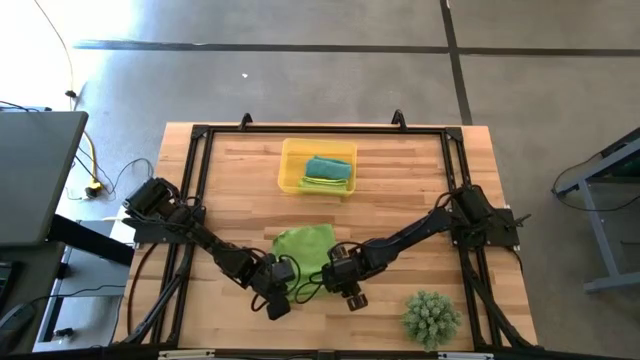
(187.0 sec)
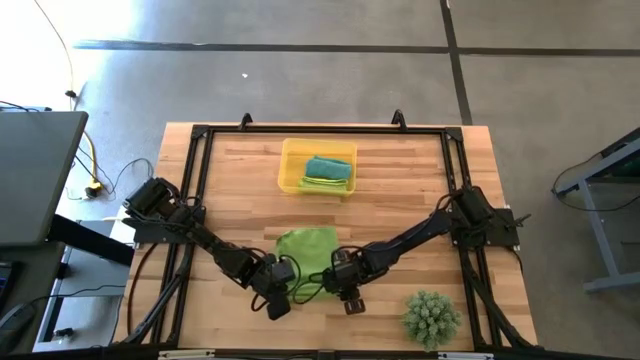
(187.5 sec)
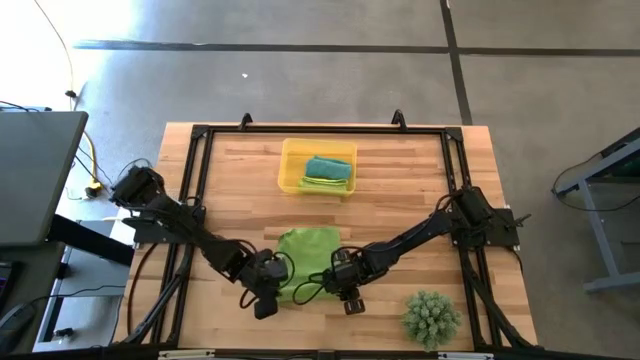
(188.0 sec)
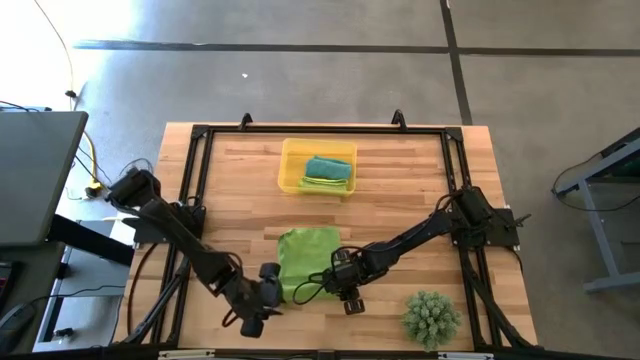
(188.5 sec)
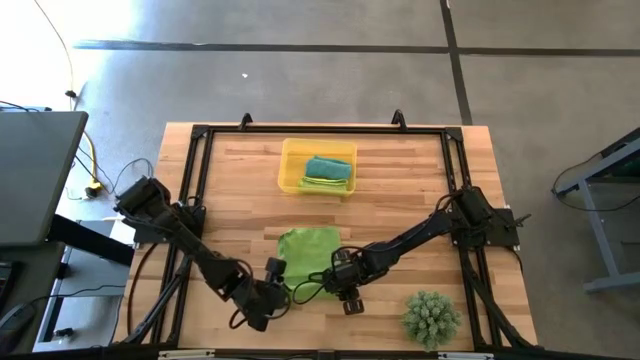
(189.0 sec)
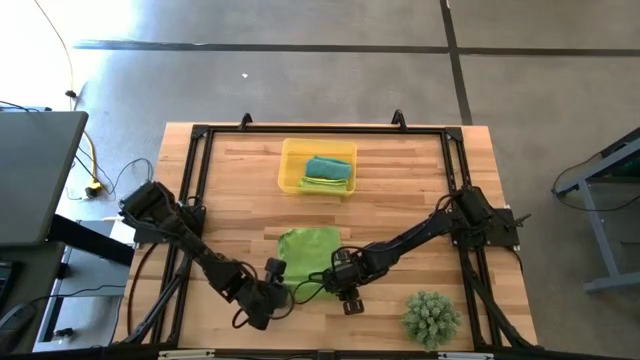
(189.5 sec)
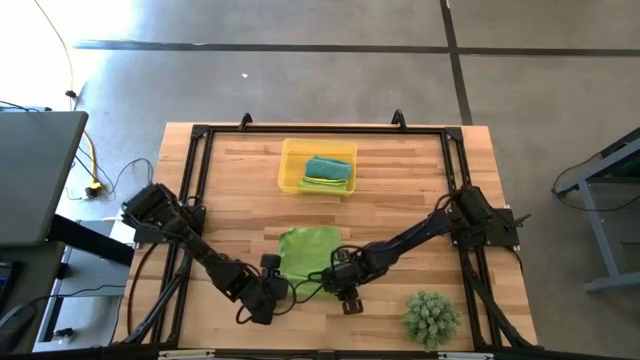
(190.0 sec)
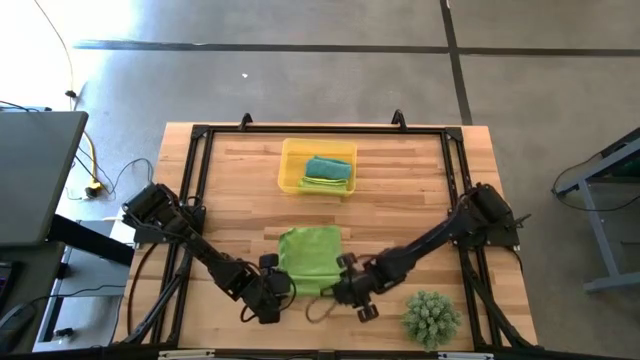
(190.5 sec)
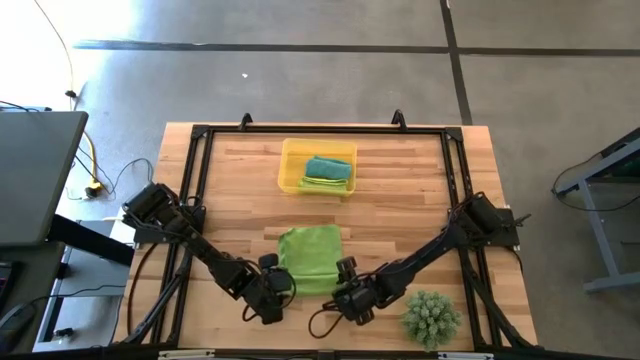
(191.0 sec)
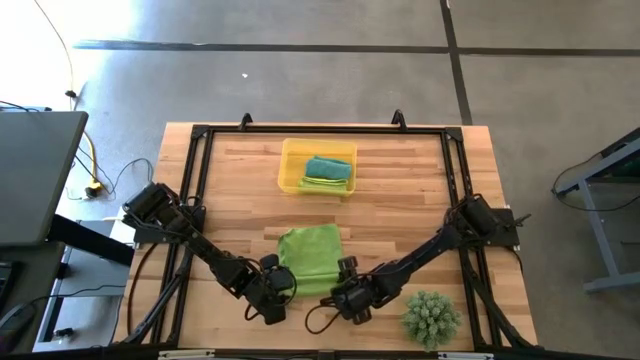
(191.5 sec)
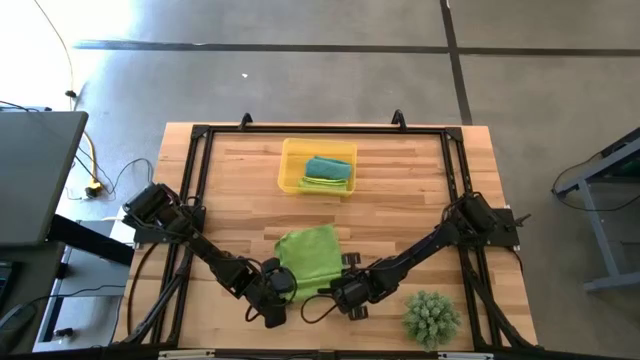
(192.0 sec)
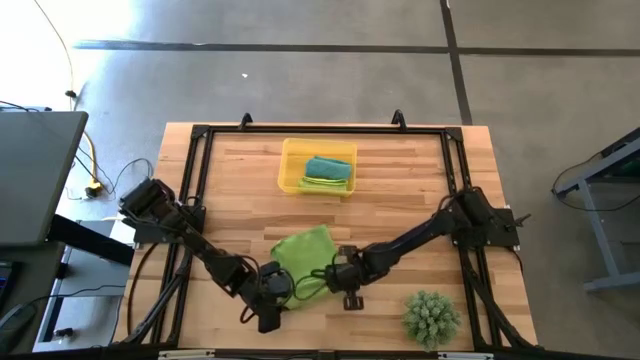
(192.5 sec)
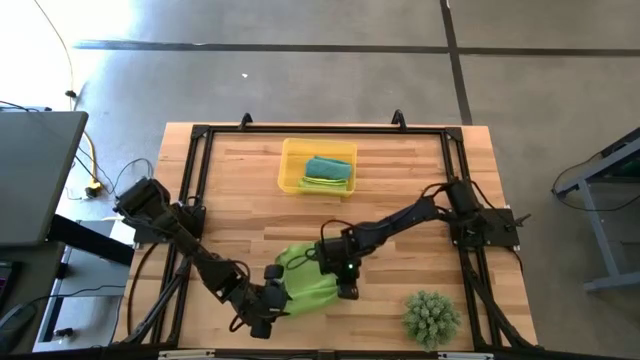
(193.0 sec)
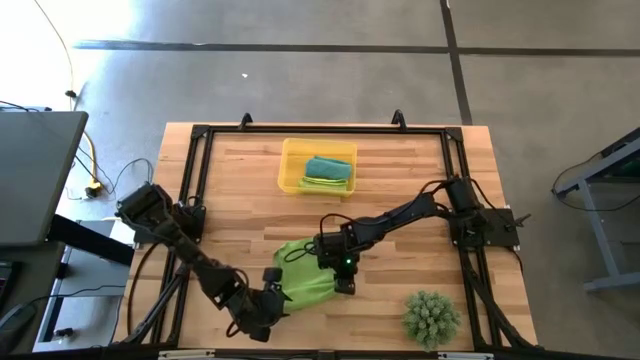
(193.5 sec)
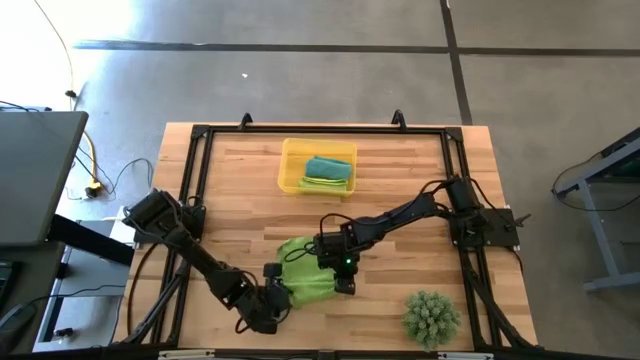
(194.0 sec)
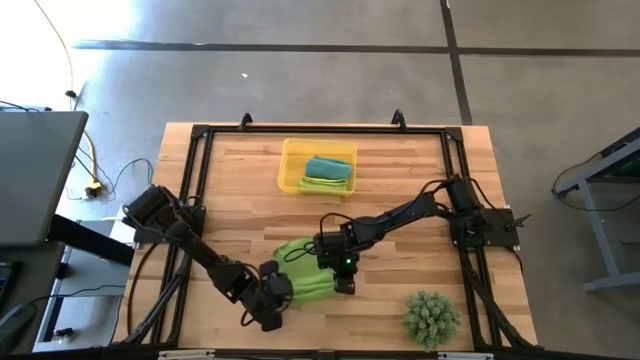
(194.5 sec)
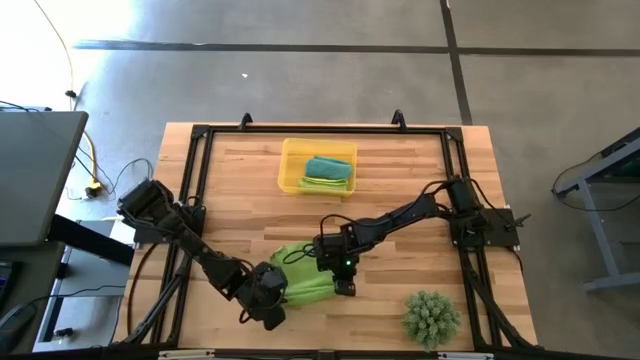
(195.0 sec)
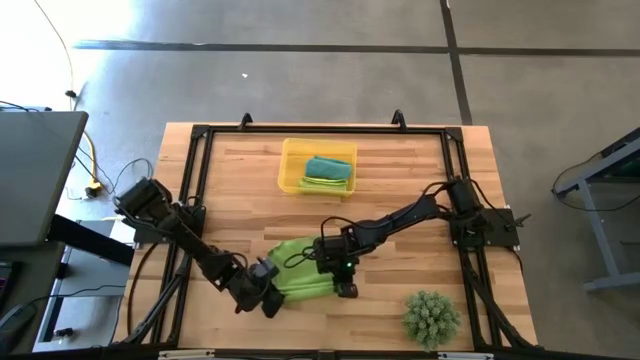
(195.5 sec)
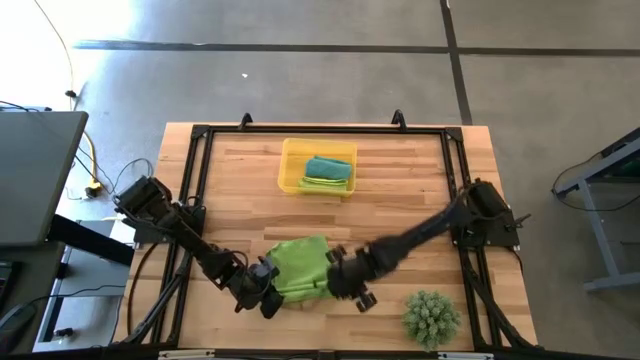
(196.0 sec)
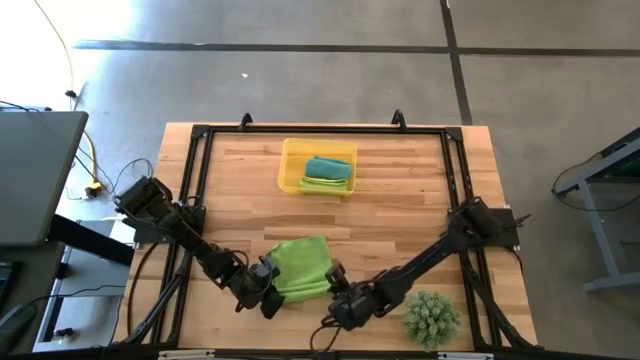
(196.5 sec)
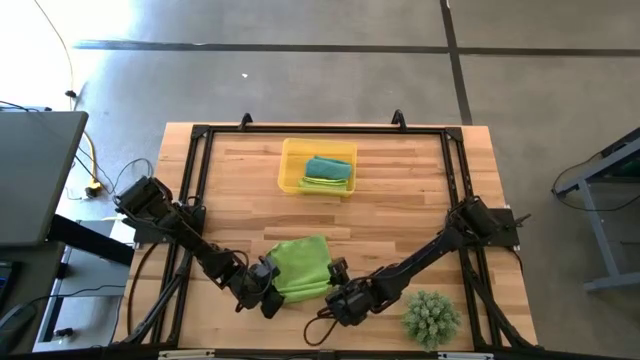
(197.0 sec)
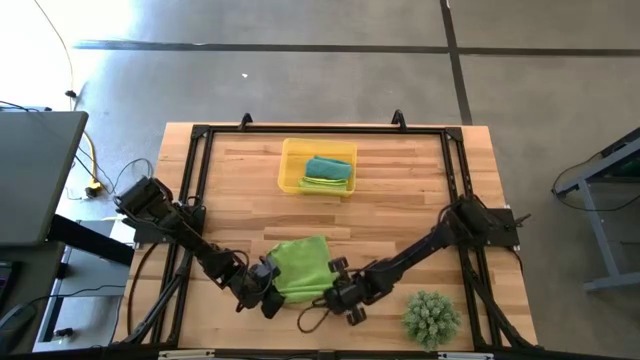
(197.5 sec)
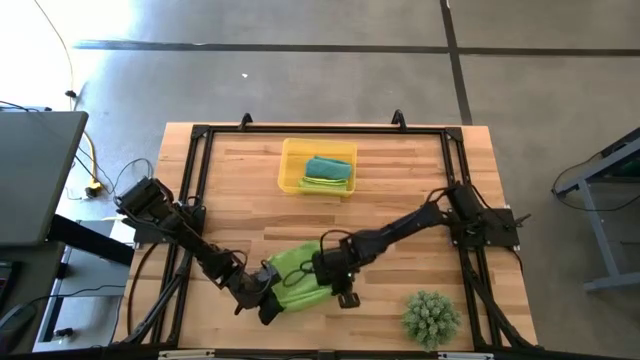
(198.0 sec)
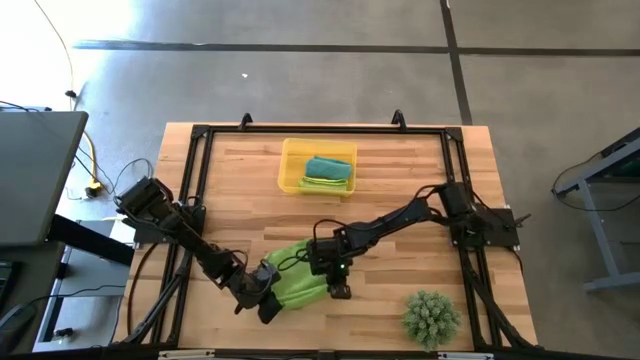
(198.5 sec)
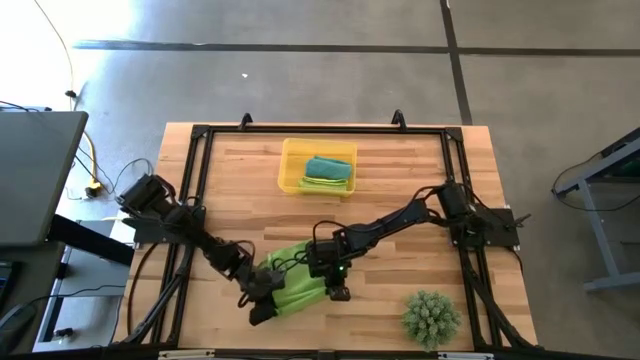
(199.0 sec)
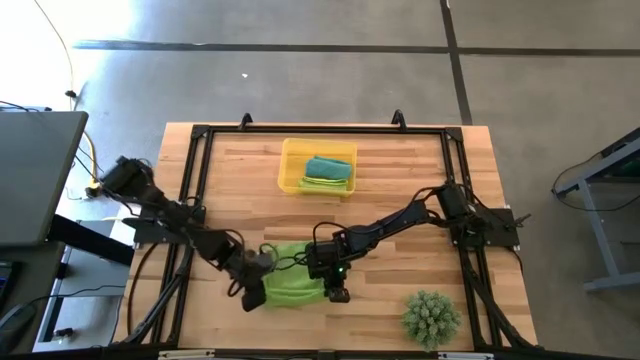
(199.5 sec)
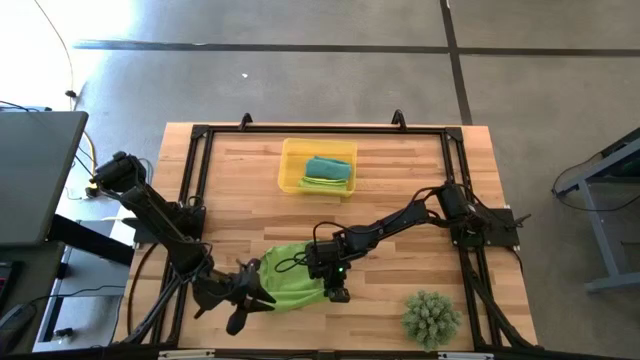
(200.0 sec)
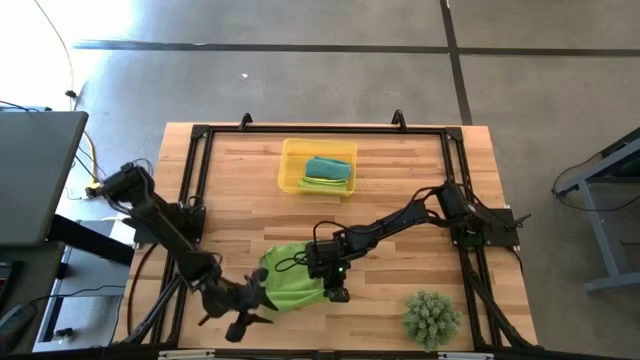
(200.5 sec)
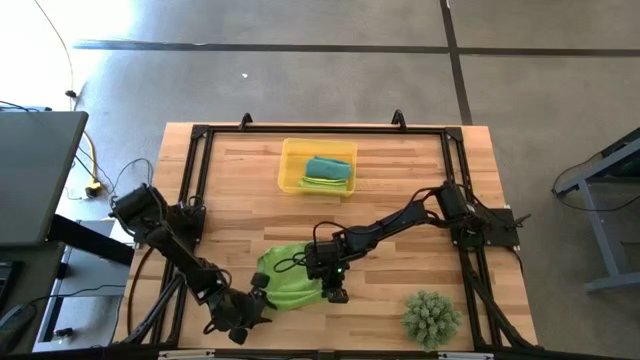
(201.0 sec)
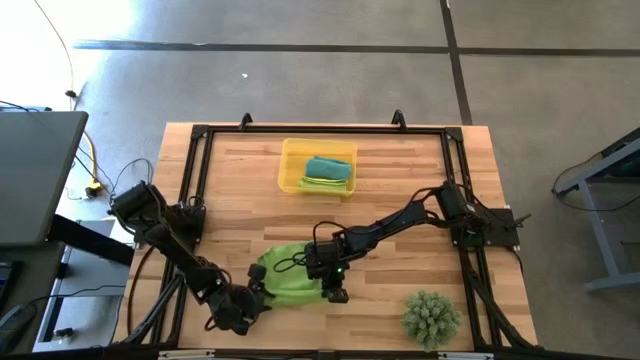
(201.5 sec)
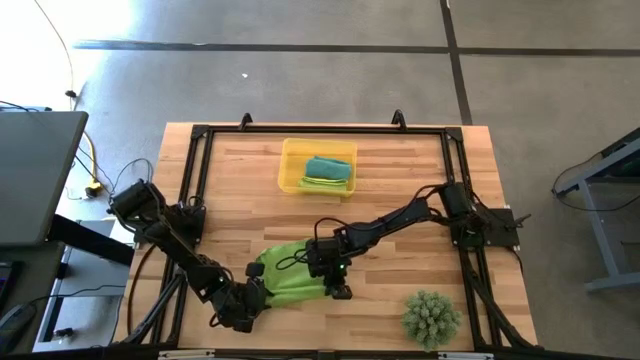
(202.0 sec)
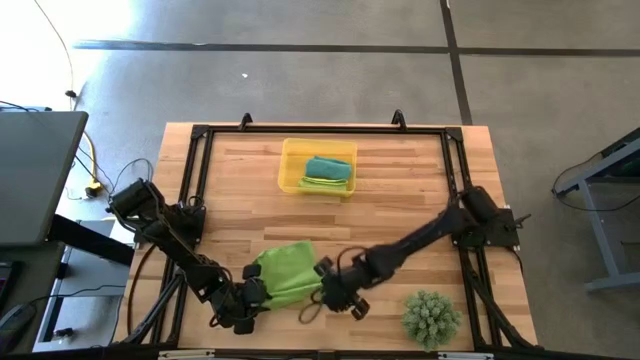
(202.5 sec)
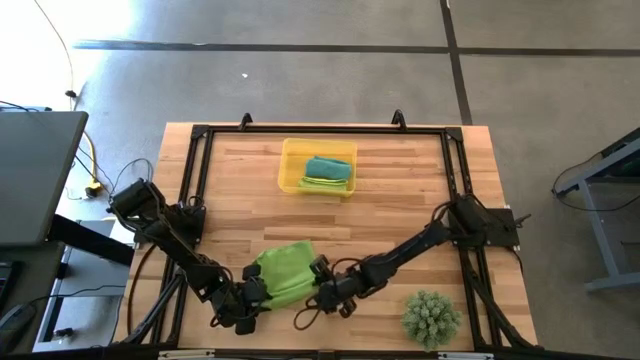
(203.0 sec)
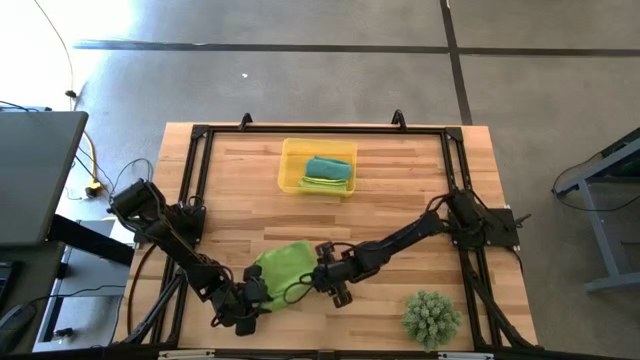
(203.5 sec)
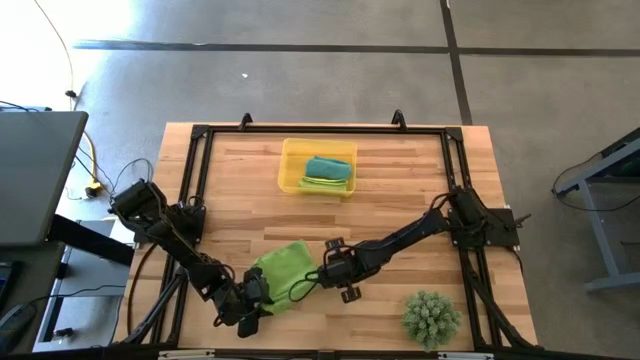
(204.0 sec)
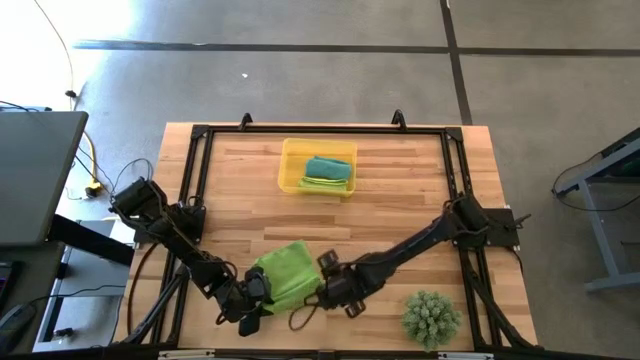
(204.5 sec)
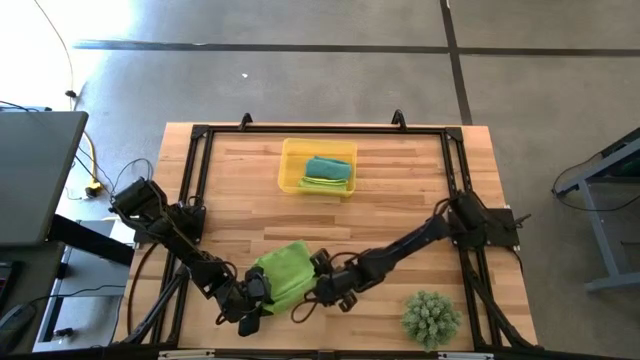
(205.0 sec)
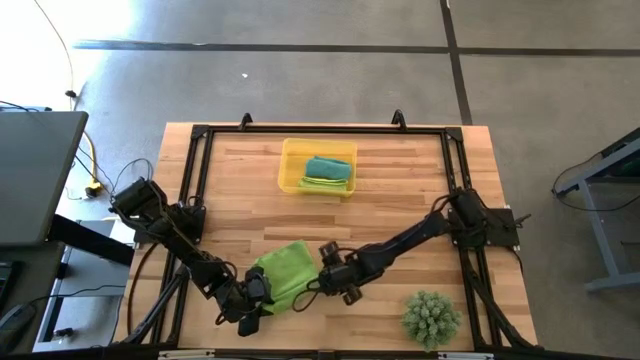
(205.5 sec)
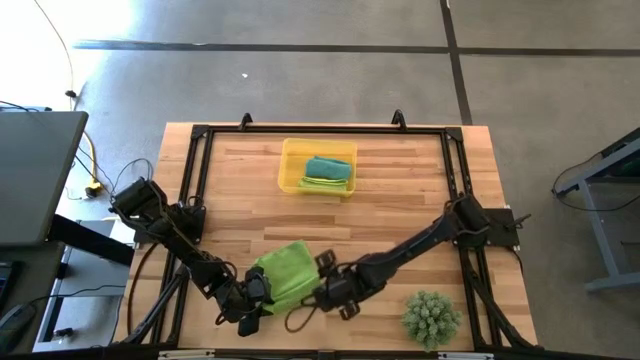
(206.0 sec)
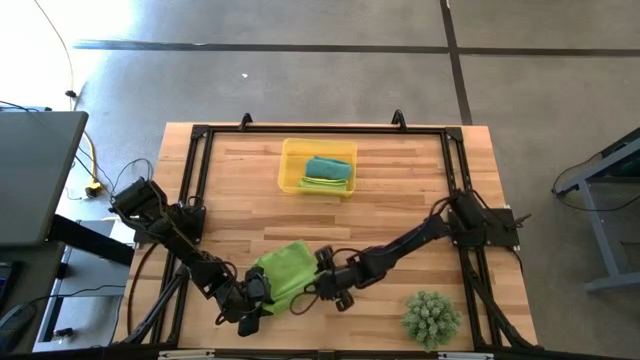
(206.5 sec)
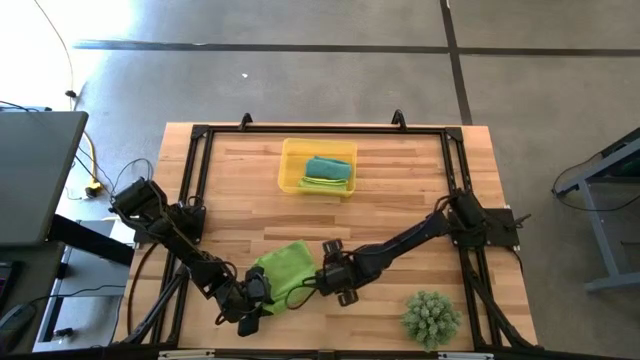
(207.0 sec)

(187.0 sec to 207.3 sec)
Task: Roll microfiber towels into tight, uniform cylinder then place into a basket
Roll the green microfiber towel
